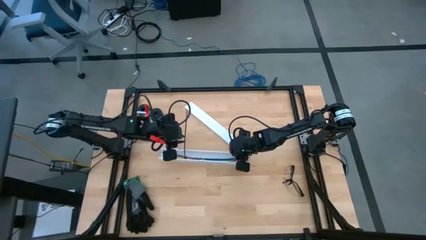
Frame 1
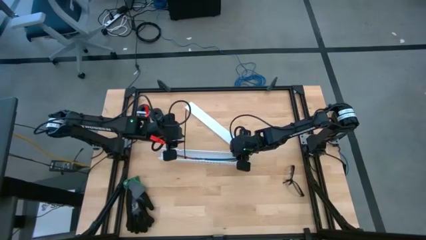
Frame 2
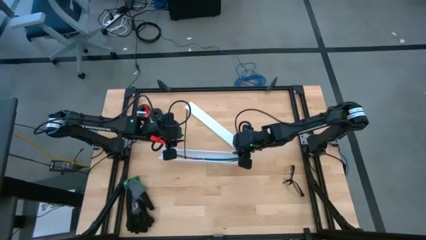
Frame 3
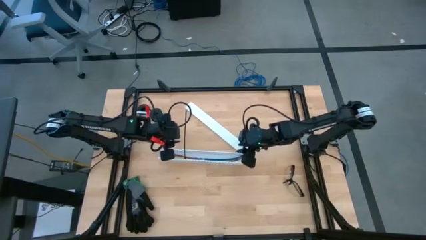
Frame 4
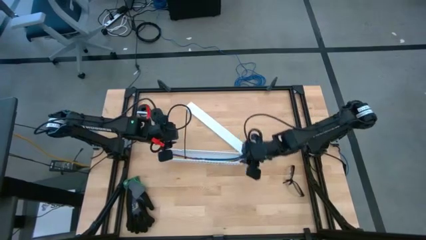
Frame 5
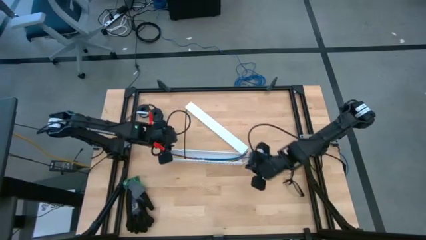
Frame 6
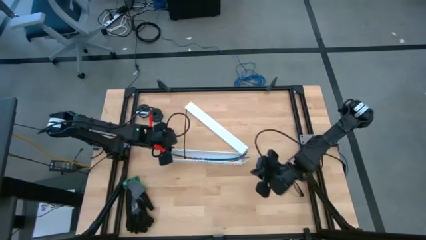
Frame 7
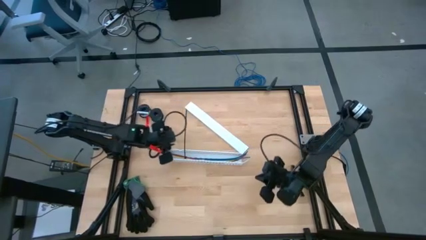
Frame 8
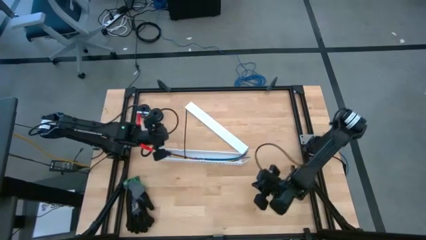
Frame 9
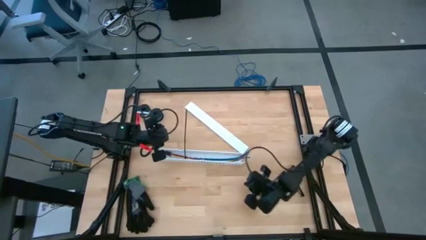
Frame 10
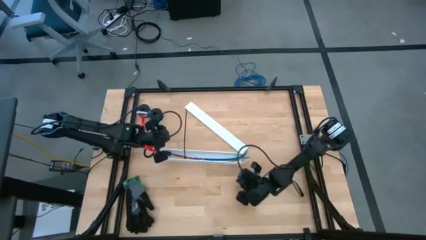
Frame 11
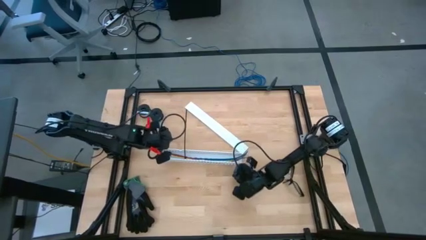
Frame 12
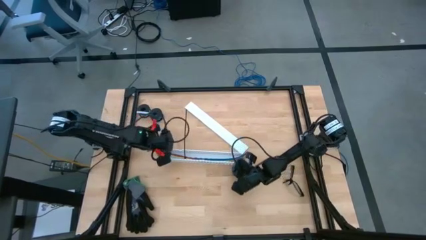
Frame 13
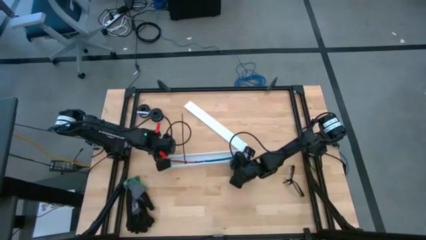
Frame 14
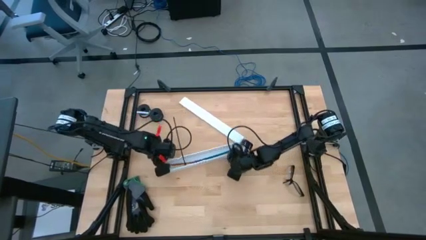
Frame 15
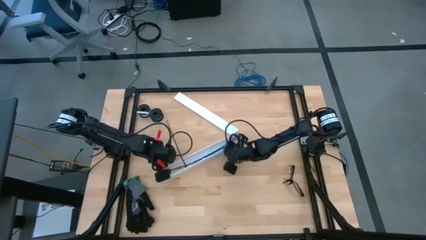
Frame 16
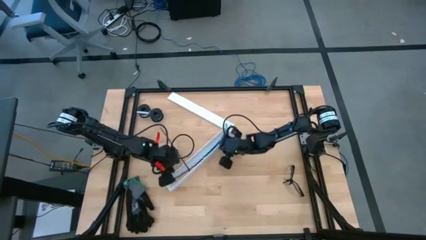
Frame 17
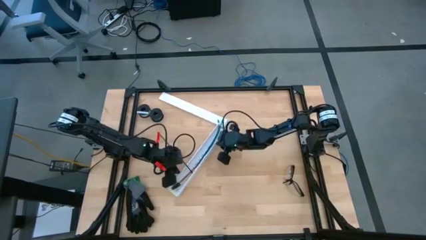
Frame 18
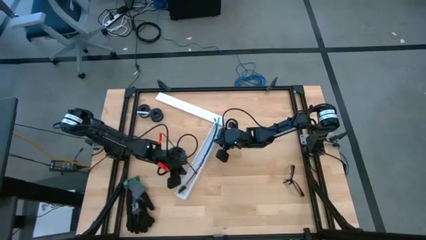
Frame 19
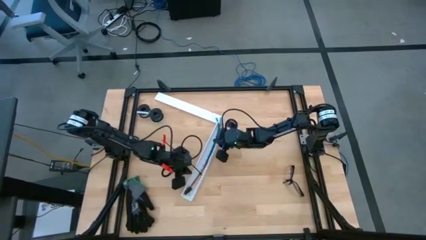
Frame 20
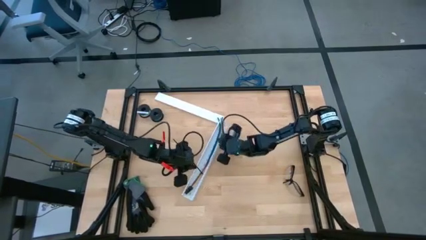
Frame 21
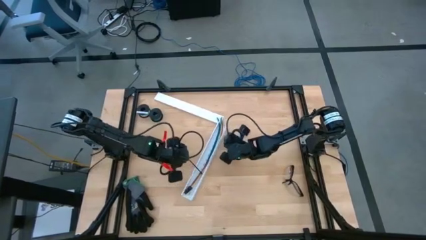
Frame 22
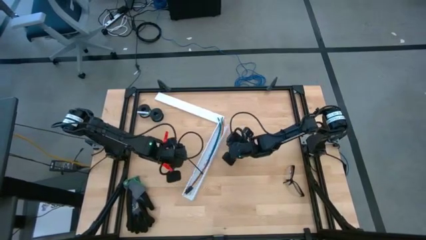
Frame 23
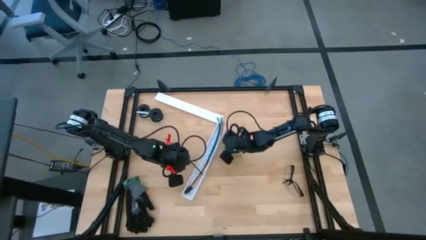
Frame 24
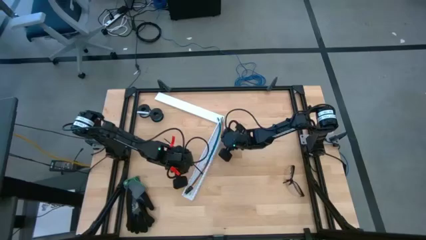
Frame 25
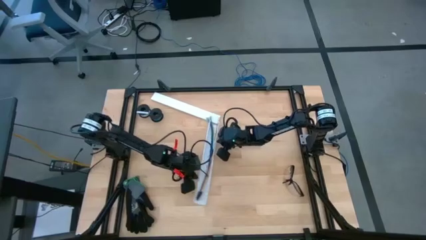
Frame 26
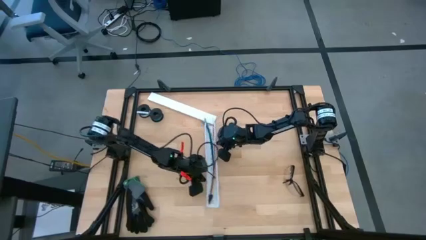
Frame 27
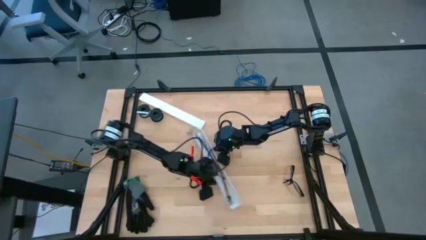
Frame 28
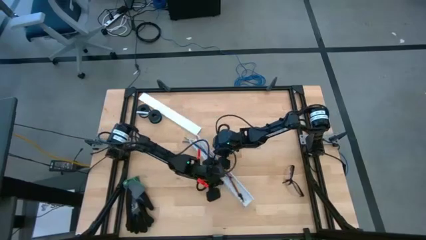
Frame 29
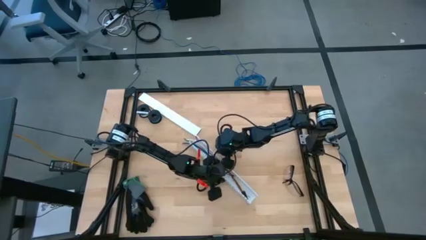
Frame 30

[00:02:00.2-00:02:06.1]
Task: Ziptie cables
Adjust the white cable duct

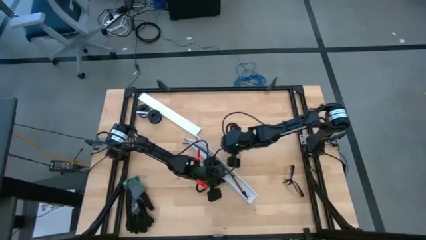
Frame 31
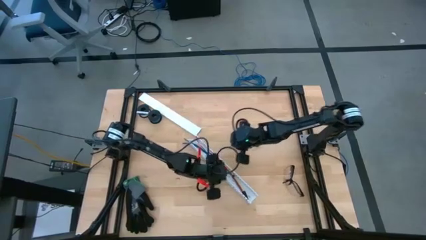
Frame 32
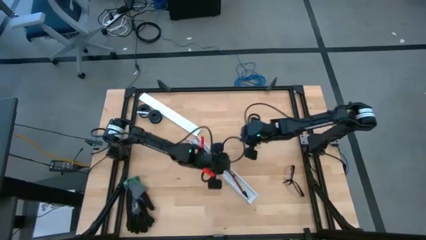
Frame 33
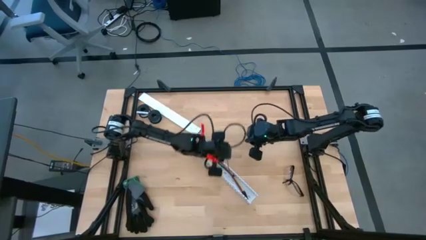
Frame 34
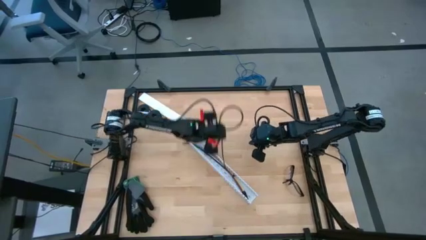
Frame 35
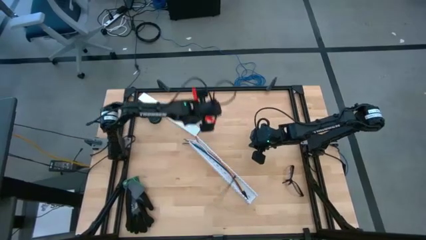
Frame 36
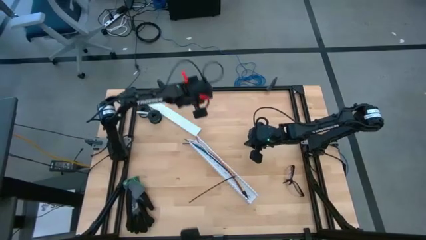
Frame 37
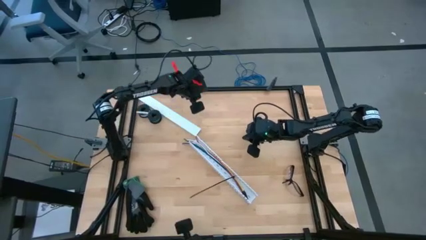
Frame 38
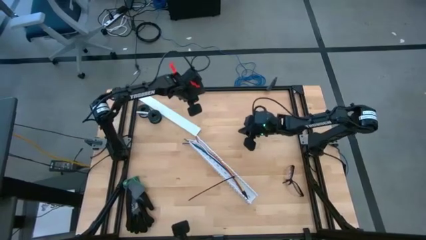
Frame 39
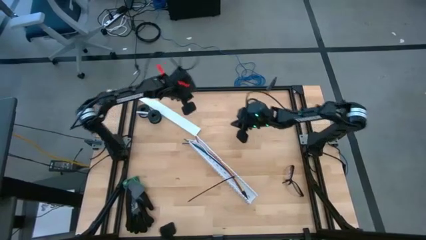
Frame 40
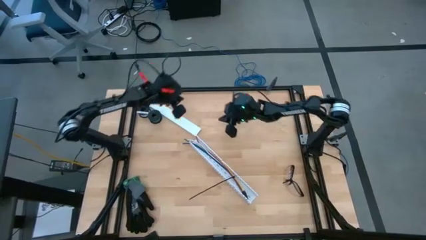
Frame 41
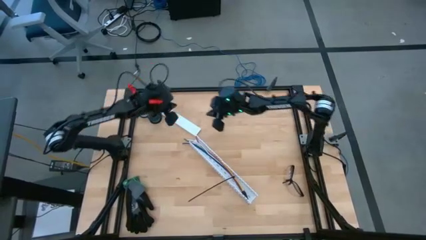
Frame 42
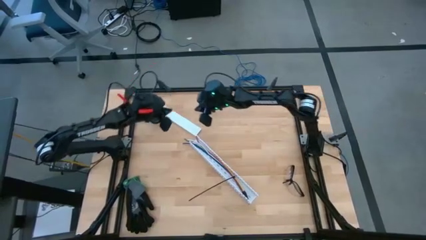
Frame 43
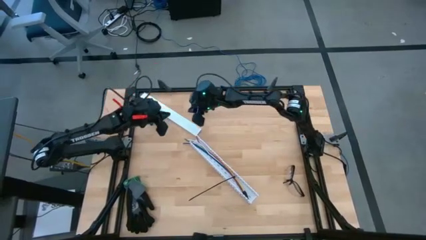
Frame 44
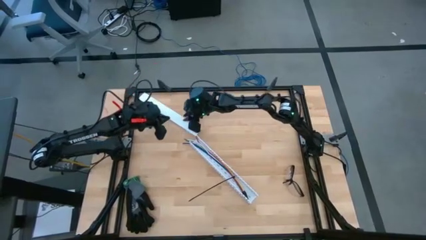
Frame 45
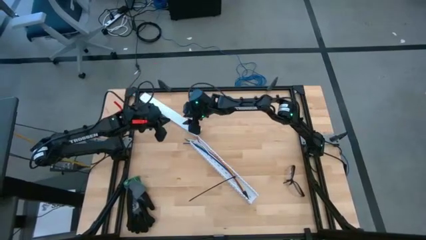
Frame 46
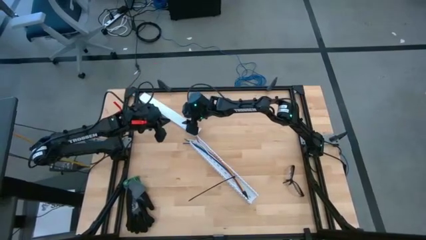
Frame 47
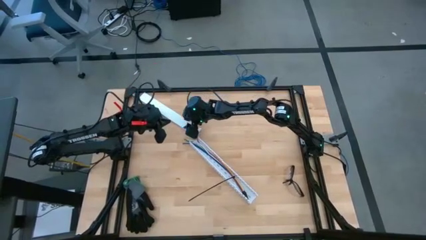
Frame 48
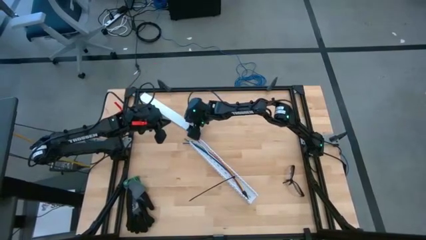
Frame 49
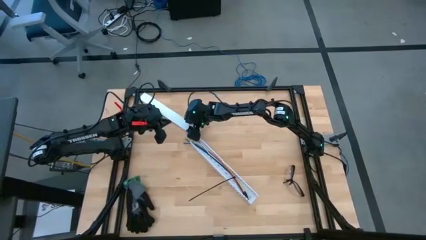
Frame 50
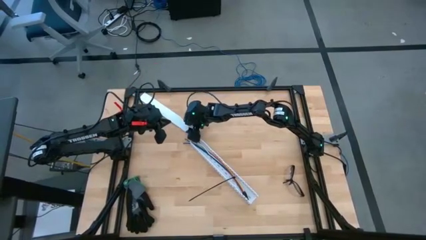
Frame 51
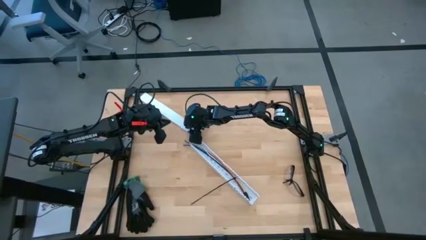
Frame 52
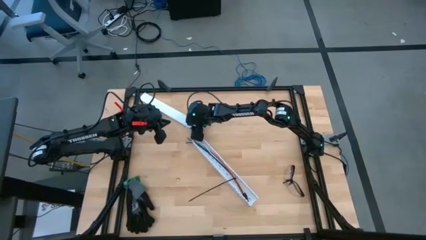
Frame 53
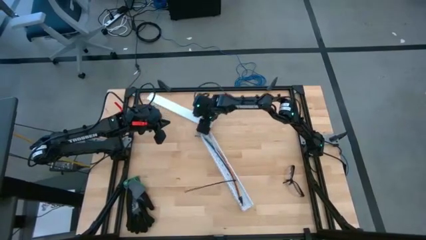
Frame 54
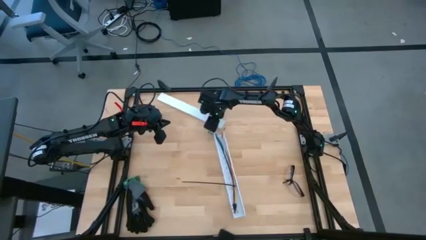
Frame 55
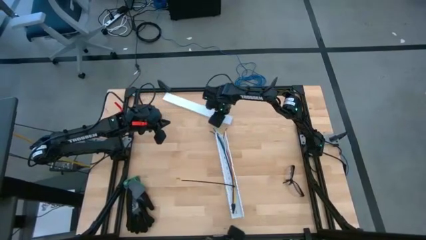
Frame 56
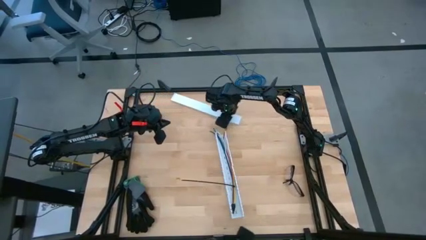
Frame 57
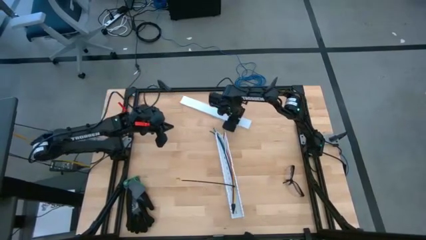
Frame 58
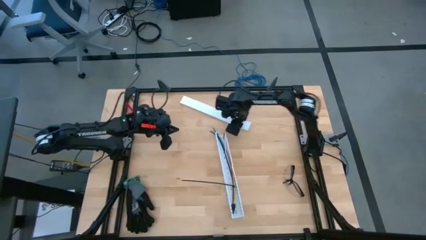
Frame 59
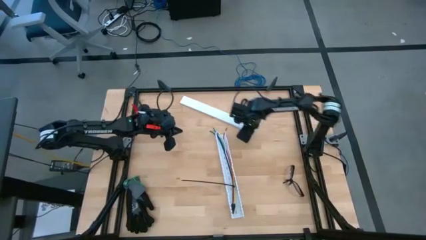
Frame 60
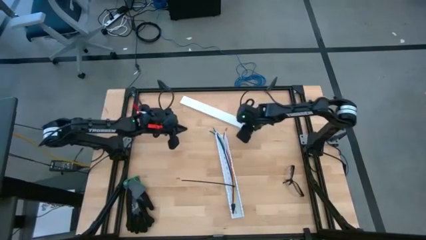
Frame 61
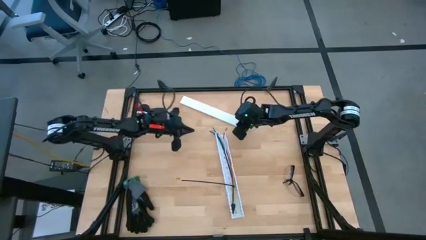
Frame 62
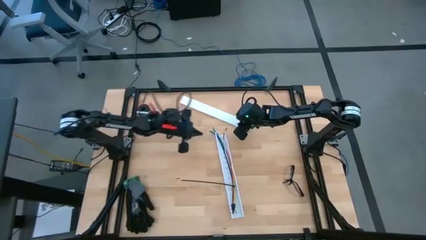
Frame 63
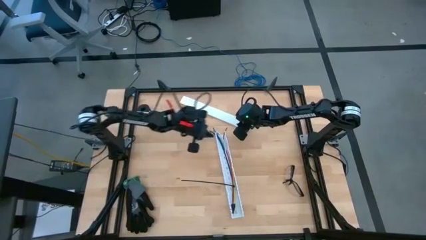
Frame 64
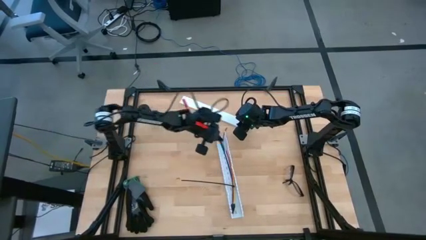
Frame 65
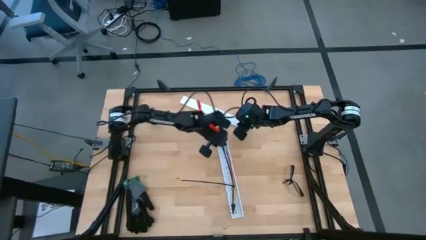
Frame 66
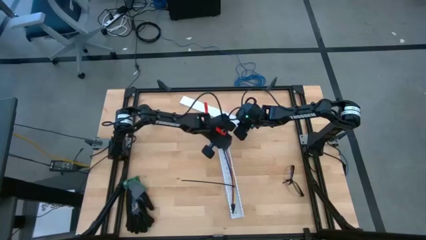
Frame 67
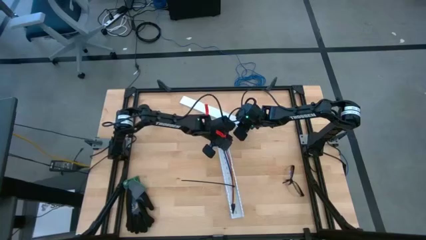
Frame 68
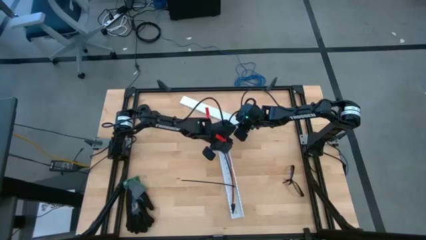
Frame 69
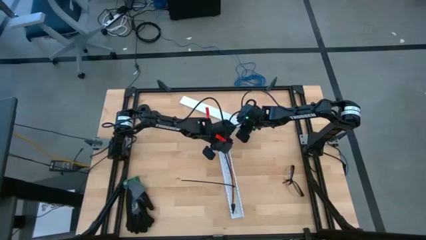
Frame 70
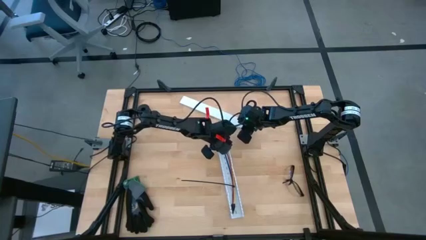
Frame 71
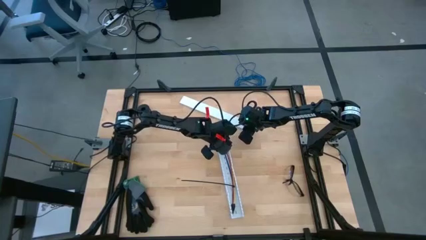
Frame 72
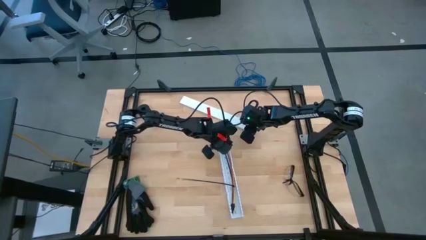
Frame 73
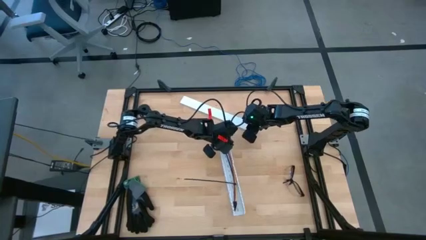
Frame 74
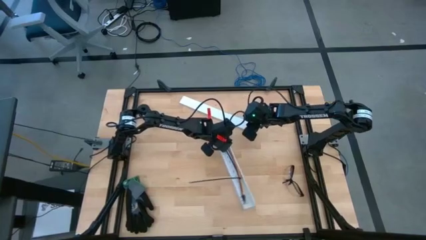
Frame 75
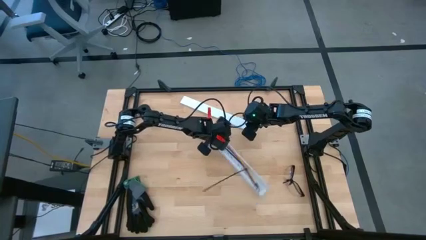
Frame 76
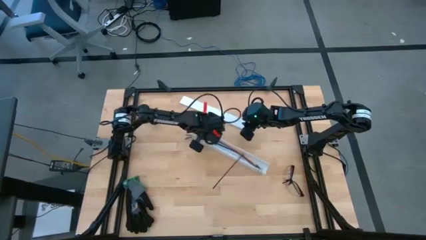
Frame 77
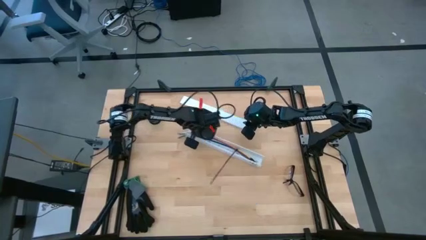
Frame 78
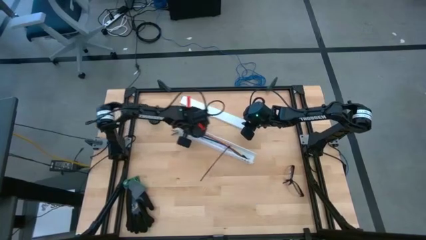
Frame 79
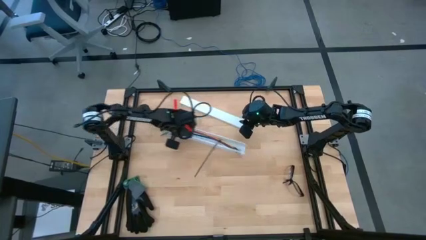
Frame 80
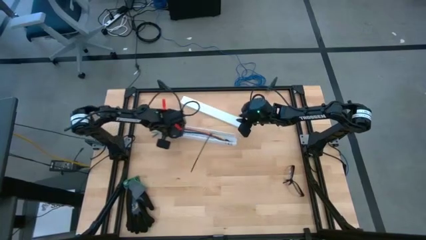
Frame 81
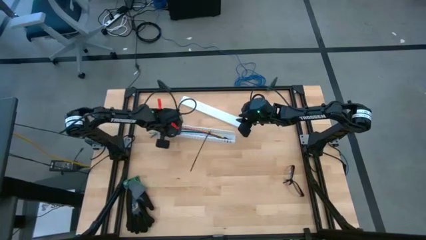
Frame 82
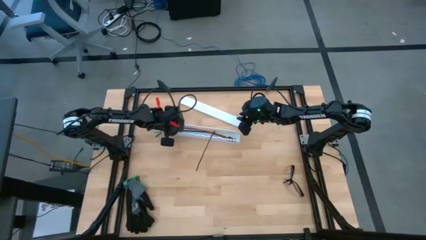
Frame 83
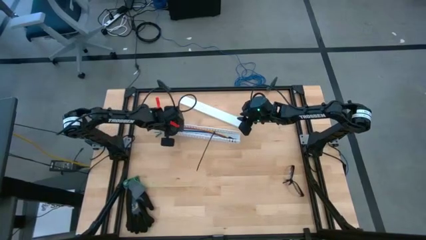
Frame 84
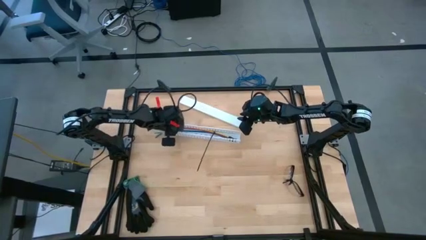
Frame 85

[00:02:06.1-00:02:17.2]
Prepare the white cable duct
